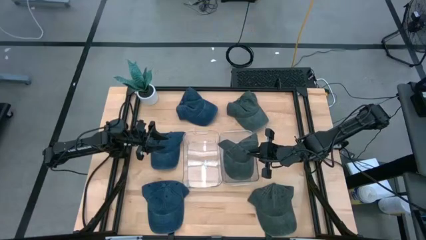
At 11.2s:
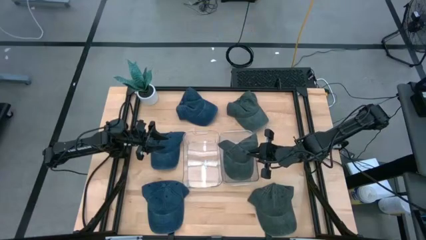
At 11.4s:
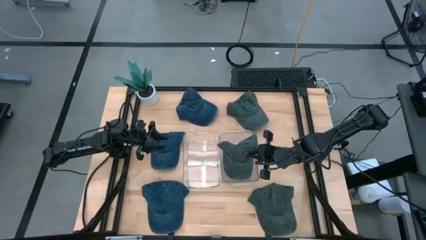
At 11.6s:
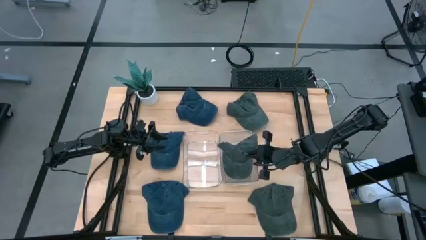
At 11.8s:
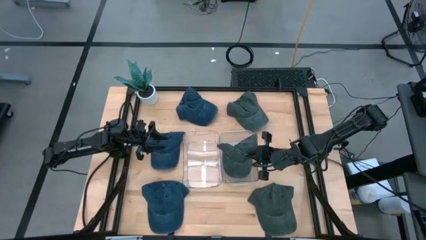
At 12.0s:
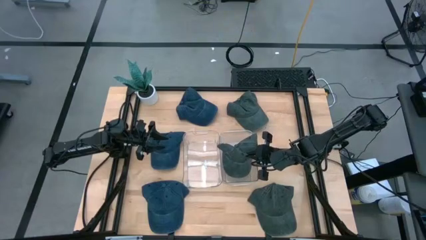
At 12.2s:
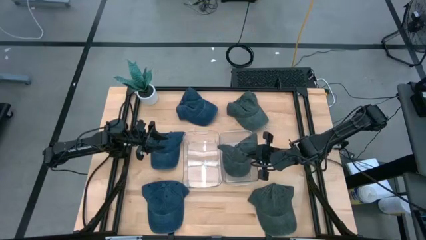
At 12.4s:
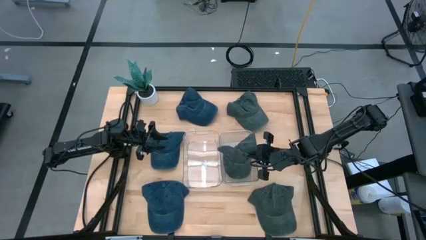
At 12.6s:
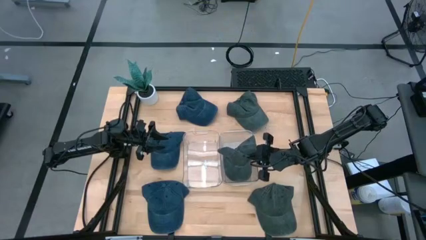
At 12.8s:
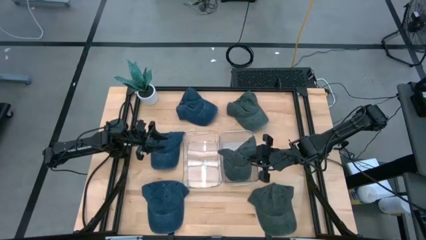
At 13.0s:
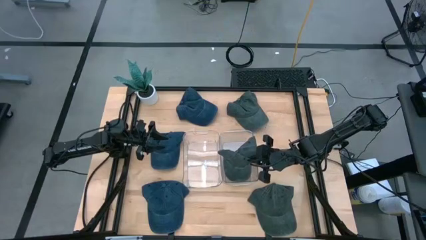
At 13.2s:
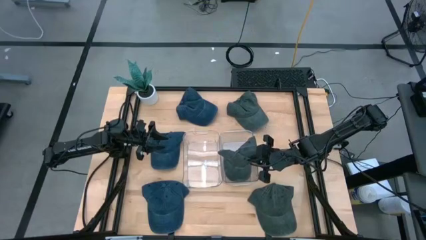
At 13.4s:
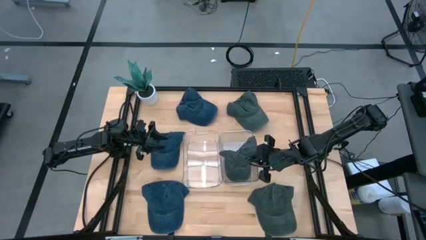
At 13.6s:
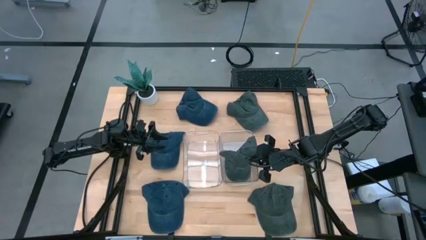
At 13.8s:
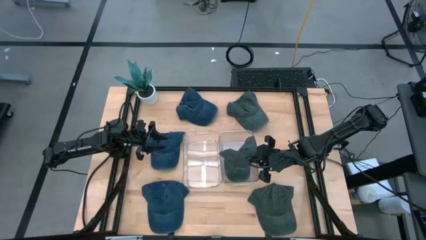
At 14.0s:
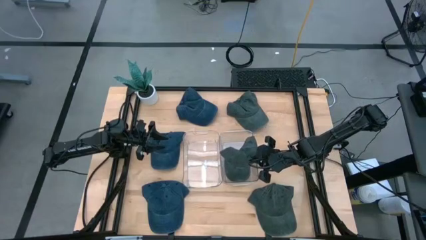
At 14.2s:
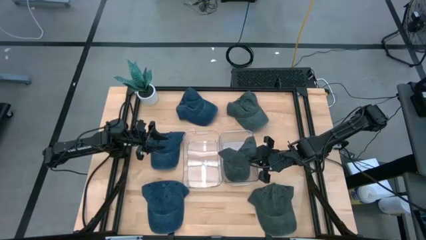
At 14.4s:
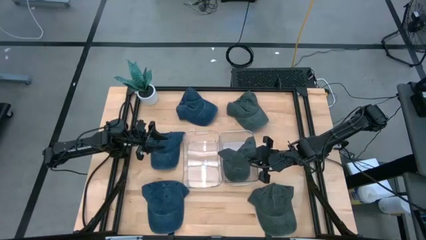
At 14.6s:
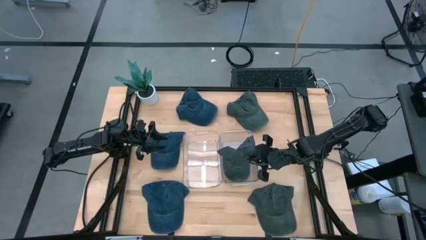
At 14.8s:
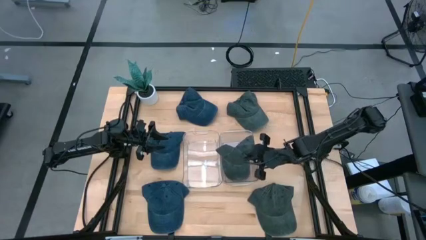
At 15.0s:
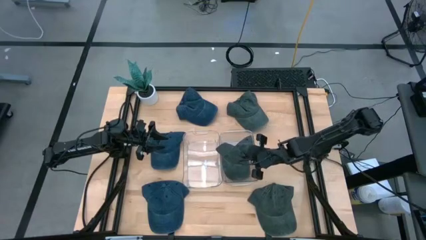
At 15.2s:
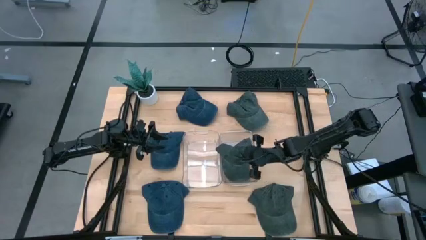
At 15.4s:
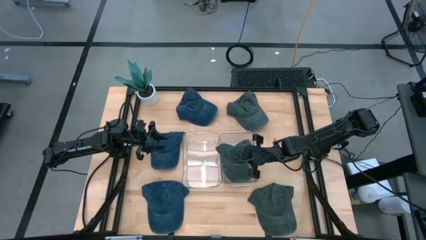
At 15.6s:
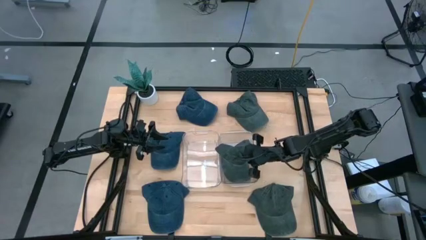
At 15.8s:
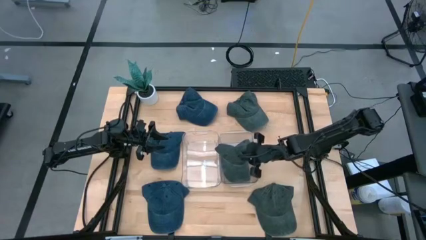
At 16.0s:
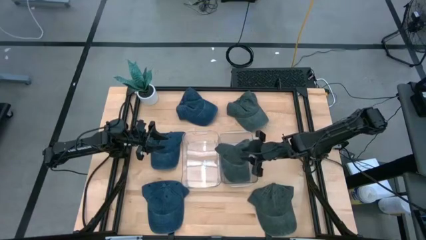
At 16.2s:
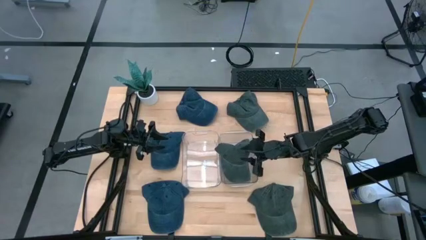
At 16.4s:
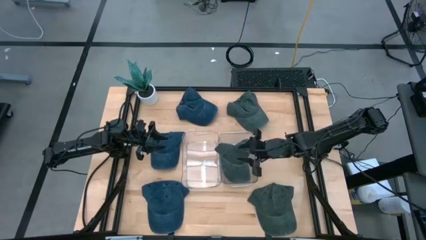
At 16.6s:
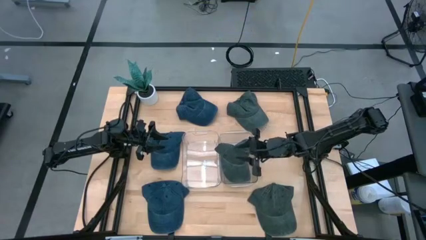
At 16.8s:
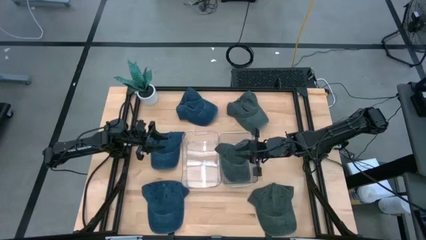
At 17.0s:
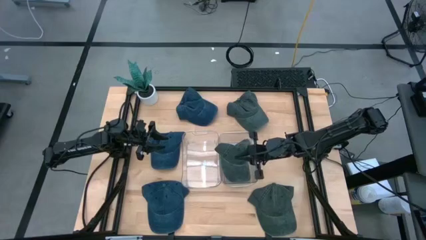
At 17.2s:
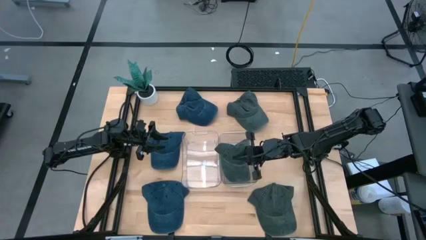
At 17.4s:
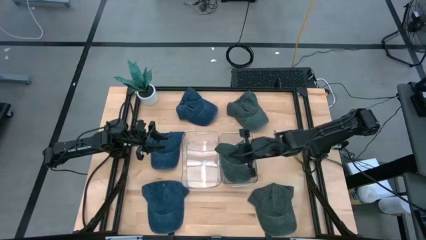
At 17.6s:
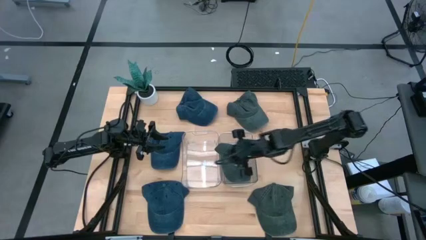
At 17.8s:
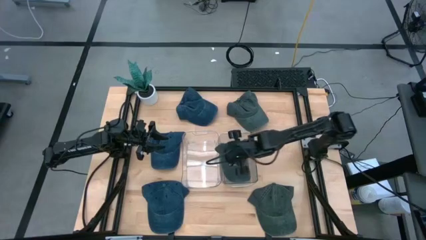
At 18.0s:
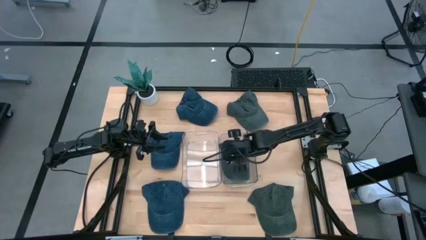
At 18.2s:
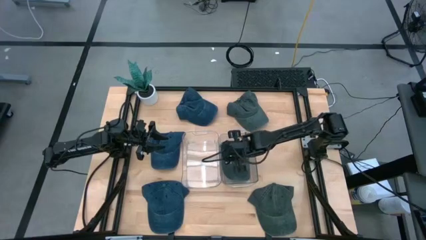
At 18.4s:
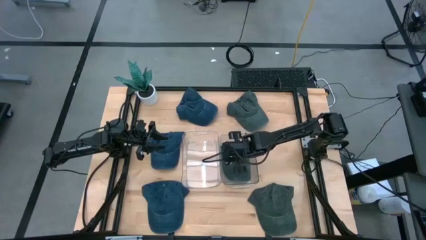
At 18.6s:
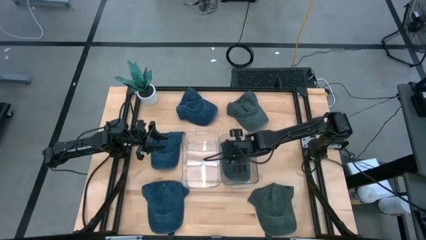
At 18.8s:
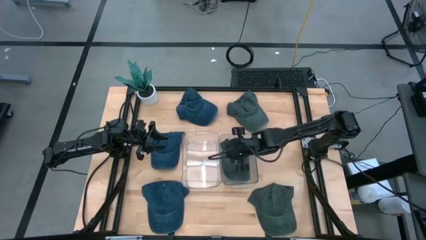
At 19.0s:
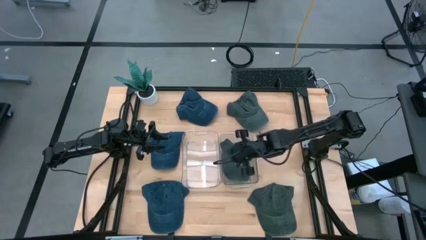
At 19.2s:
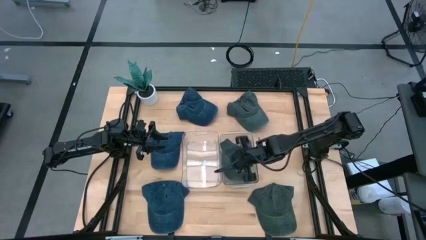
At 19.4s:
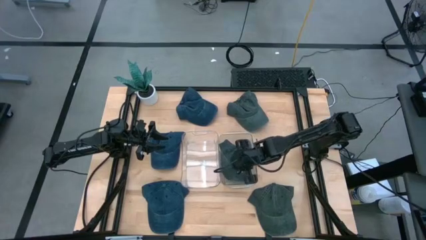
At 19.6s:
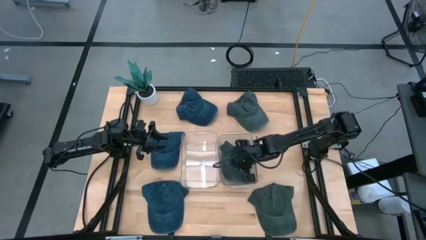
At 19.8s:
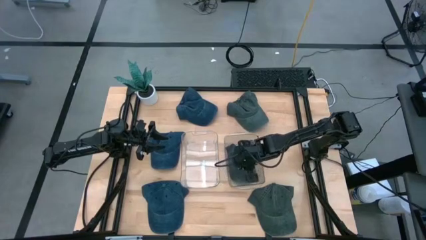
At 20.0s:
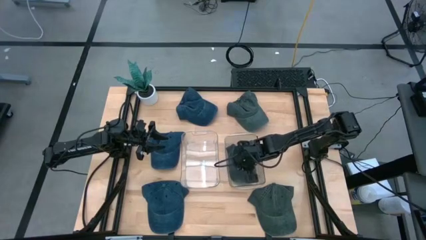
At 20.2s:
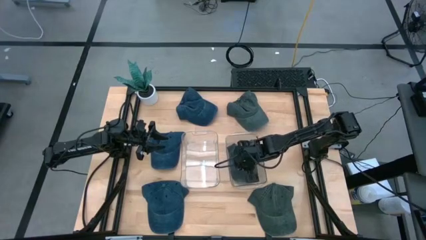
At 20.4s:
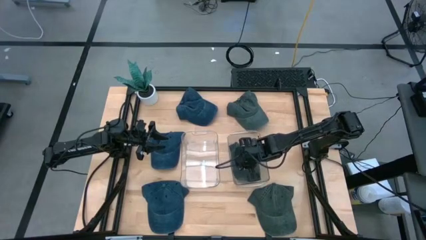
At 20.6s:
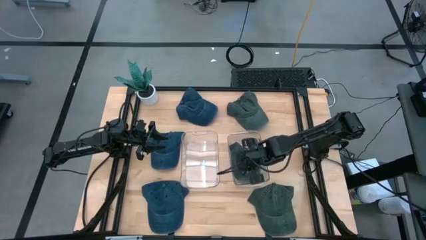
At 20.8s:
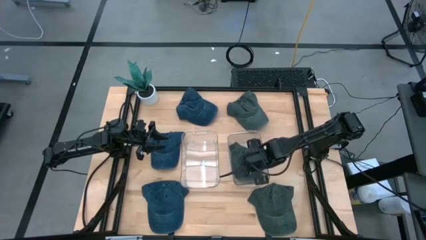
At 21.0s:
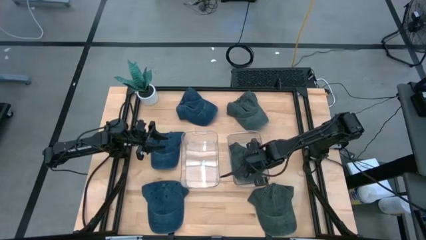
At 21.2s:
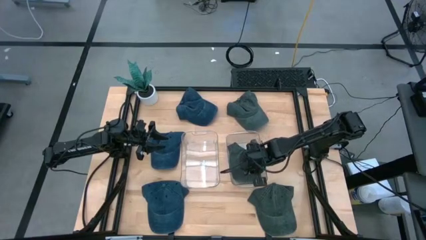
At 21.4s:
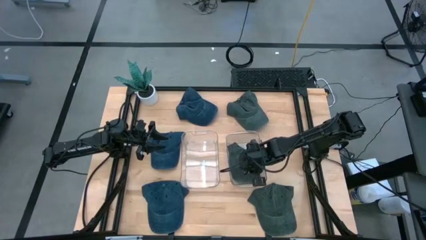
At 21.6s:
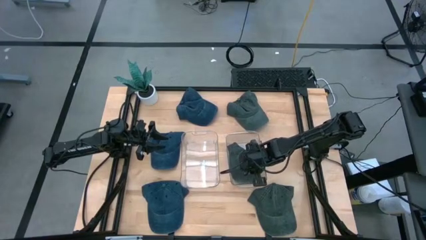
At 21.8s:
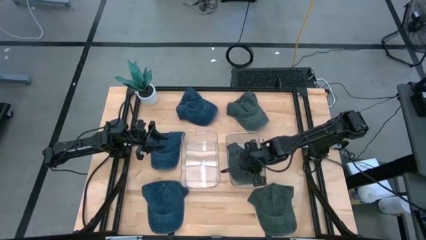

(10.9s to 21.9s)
Task: Pick & Place hat
Put the middle gray cap into the right transparent bin

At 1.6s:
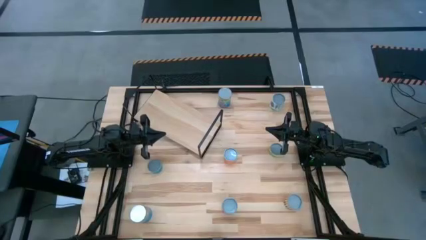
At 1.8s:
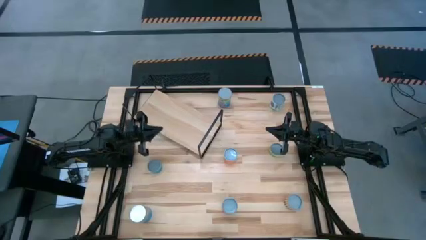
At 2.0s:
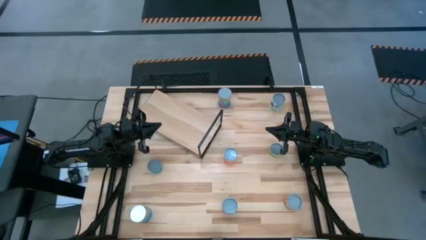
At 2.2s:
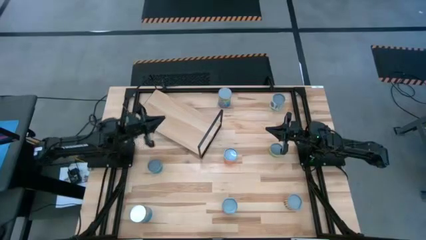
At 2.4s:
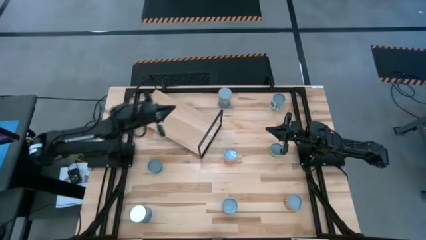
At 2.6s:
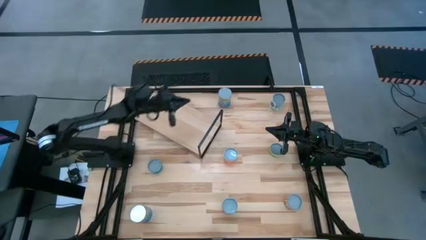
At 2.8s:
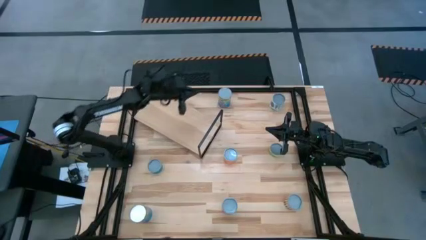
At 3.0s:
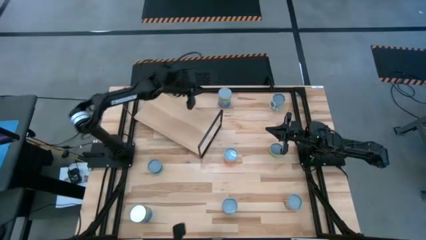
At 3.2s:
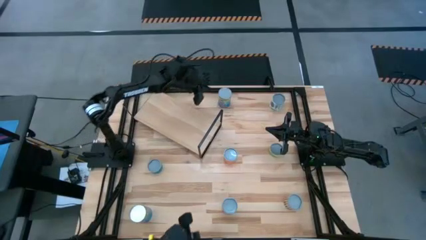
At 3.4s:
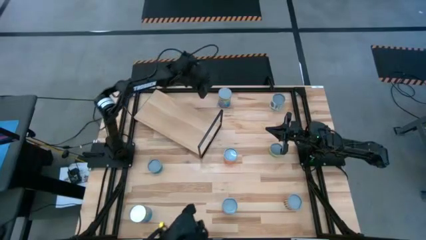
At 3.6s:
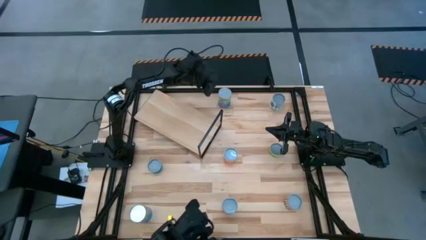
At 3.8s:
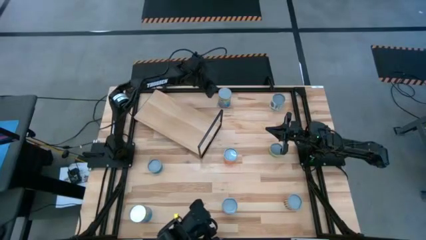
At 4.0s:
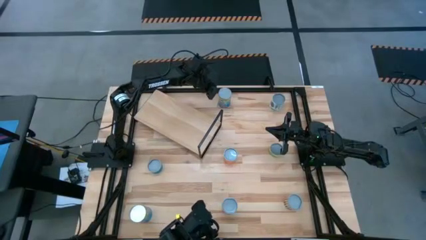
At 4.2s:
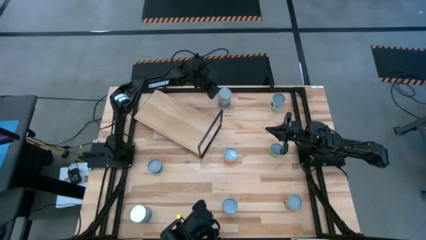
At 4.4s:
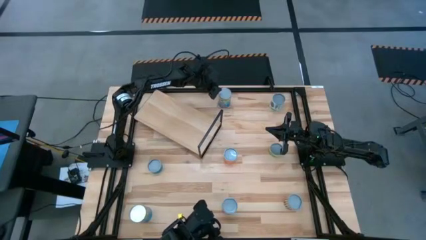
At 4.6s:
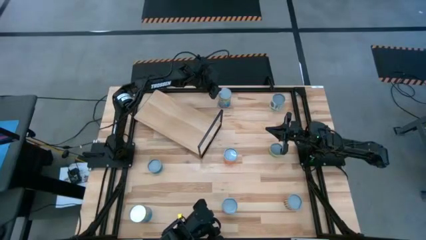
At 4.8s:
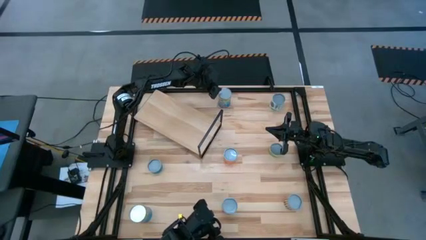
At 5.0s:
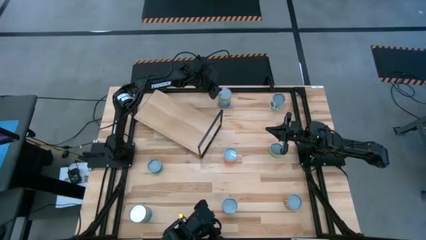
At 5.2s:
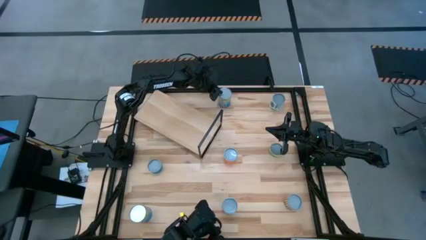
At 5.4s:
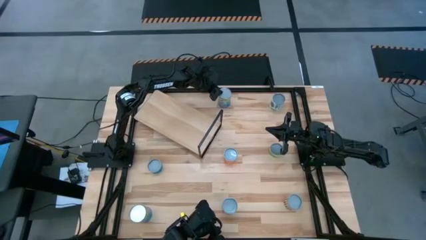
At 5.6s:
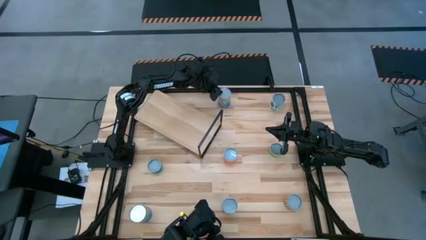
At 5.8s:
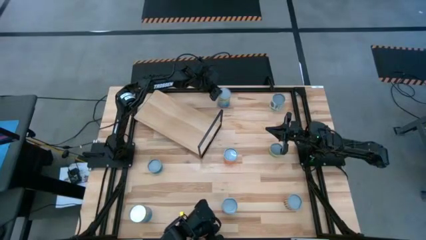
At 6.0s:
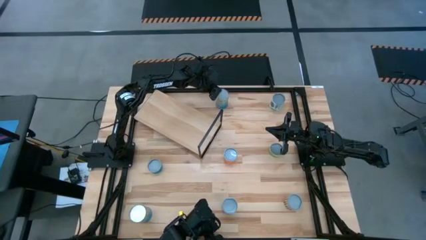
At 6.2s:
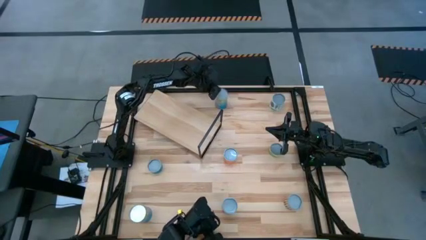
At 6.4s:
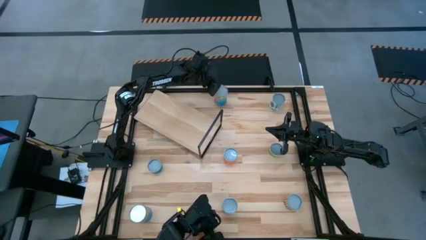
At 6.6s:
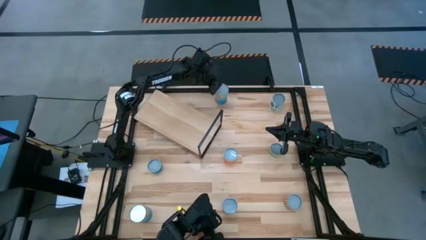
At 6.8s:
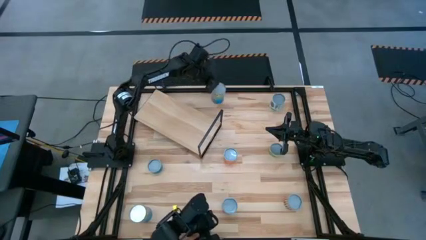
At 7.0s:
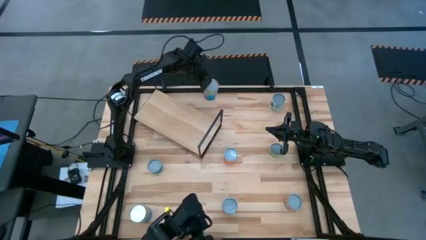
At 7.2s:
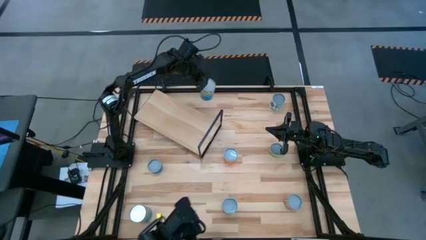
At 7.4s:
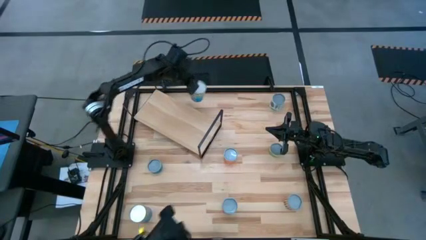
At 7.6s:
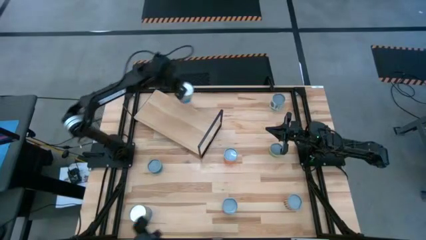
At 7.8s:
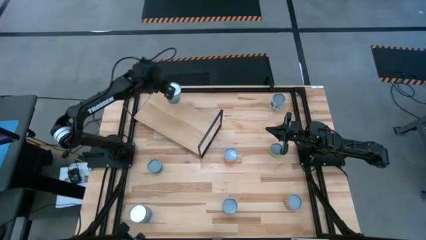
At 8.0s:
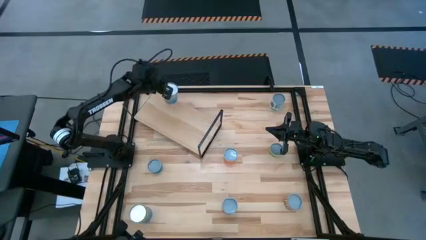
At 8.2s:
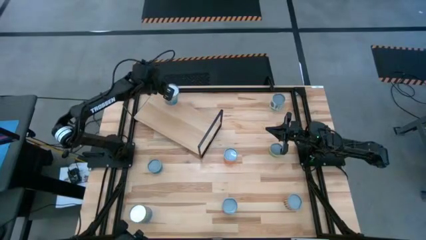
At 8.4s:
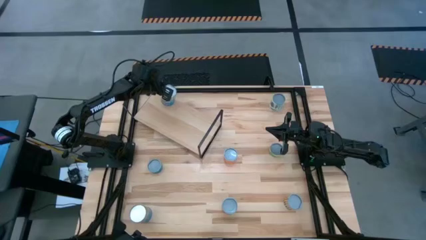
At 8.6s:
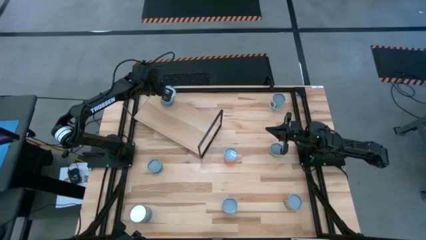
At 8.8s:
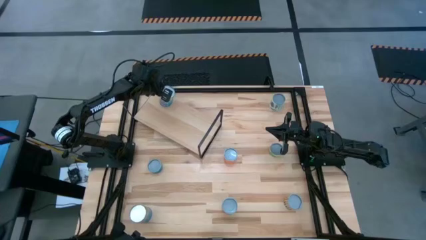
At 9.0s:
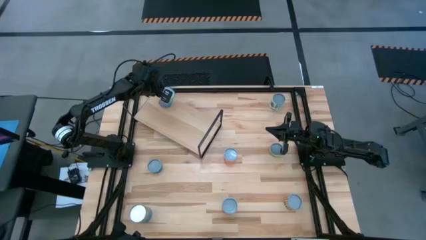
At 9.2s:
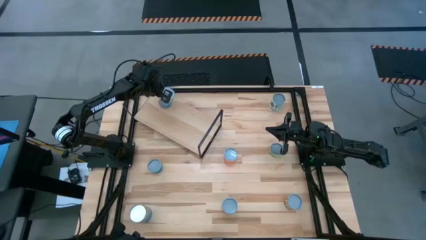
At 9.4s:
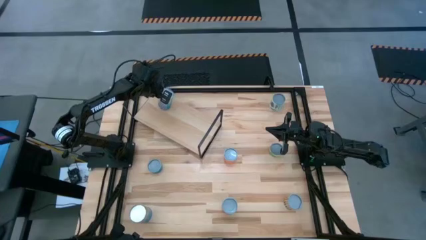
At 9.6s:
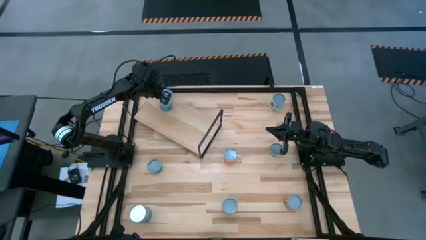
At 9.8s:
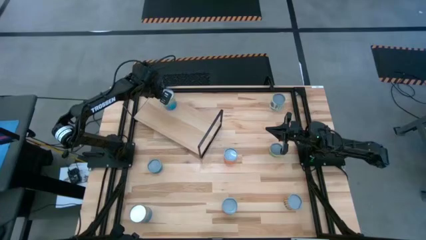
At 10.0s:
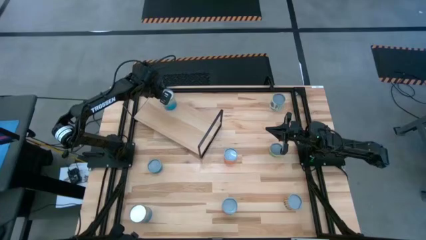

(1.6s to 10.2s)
Task: Pick and place cans onto a shelf
Put the top canned cherries on the shelf
